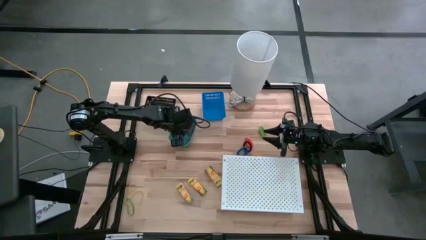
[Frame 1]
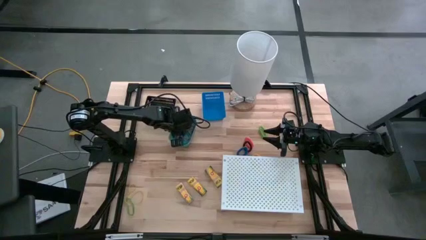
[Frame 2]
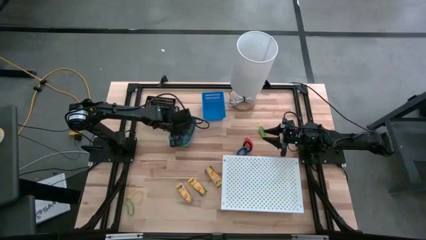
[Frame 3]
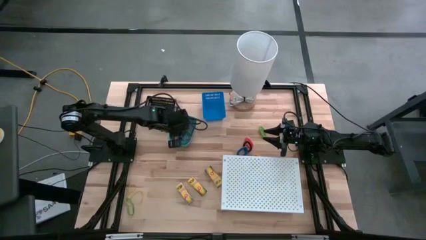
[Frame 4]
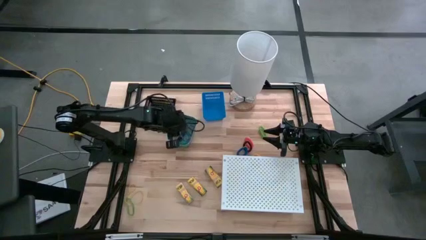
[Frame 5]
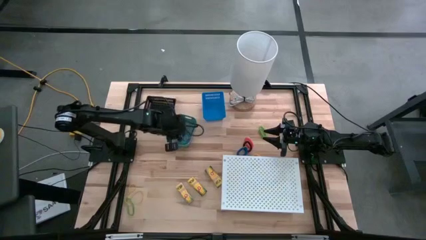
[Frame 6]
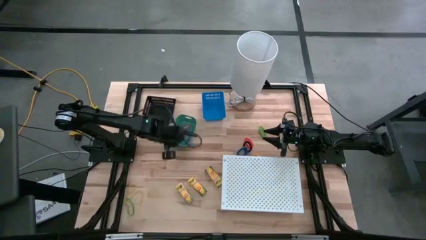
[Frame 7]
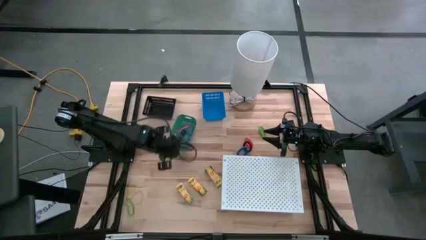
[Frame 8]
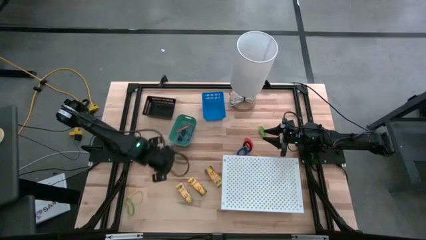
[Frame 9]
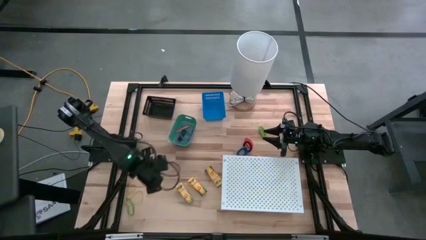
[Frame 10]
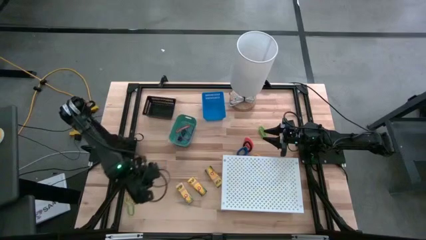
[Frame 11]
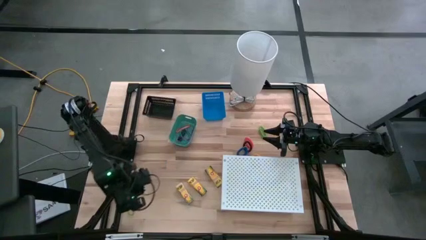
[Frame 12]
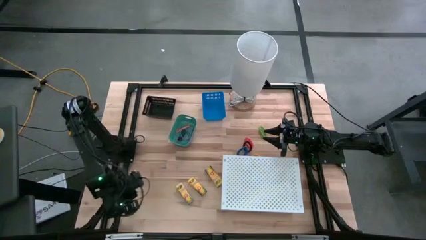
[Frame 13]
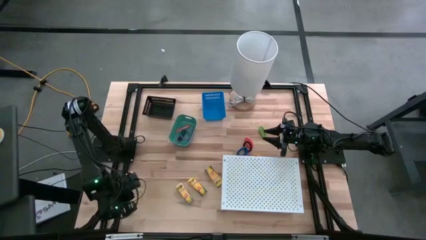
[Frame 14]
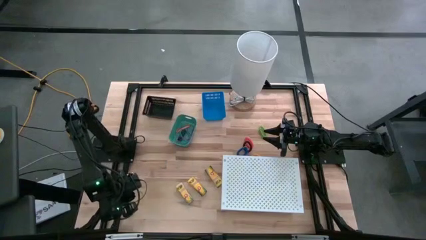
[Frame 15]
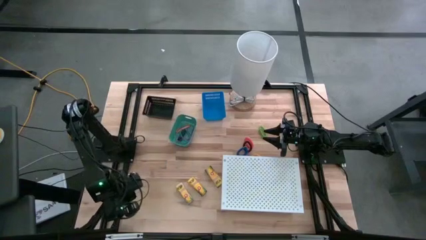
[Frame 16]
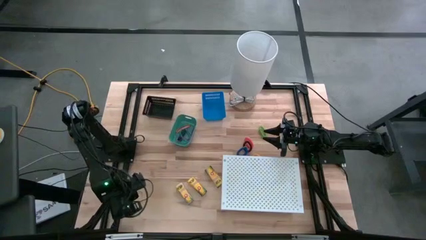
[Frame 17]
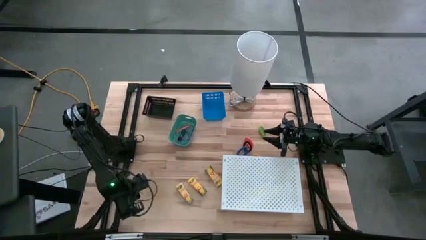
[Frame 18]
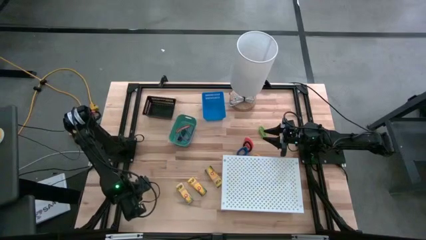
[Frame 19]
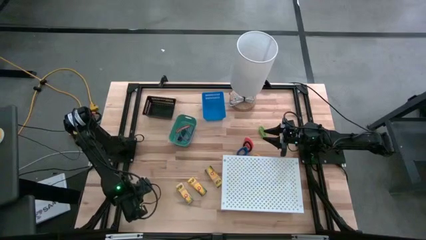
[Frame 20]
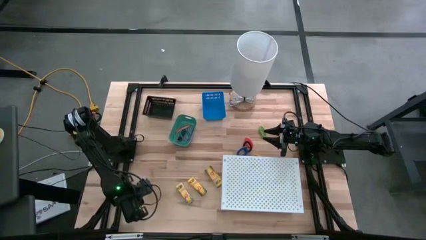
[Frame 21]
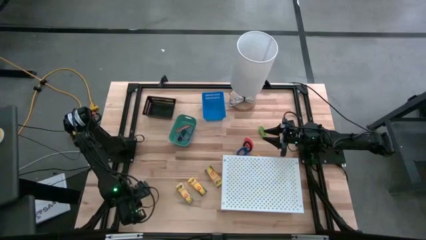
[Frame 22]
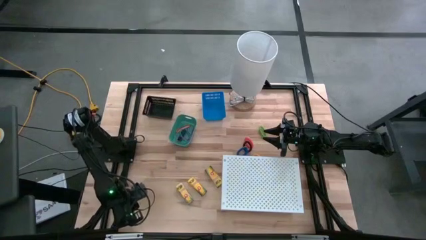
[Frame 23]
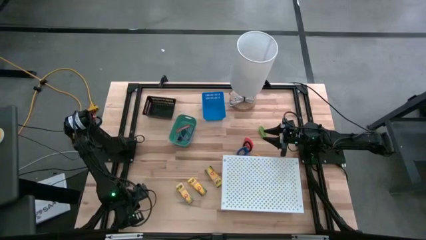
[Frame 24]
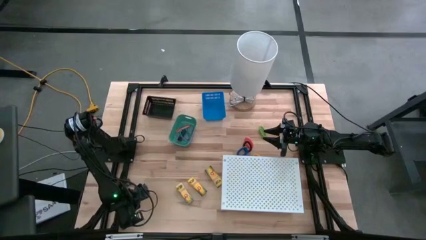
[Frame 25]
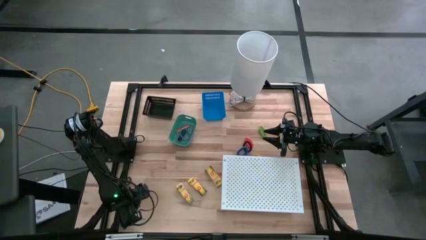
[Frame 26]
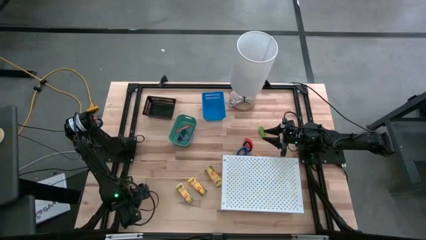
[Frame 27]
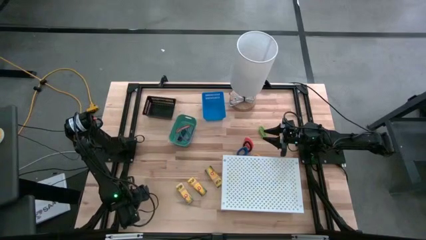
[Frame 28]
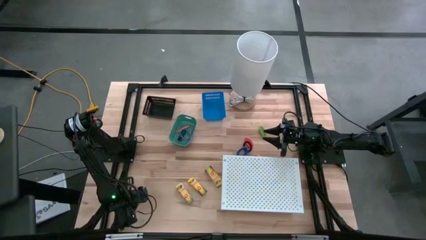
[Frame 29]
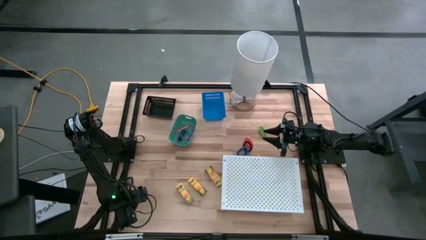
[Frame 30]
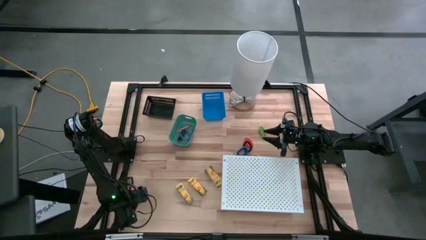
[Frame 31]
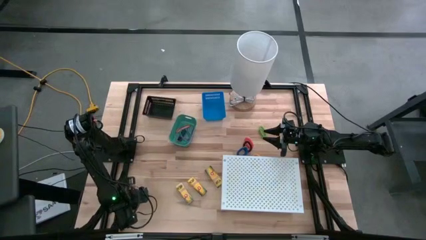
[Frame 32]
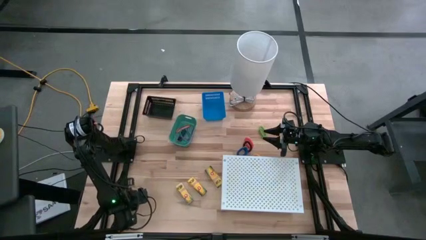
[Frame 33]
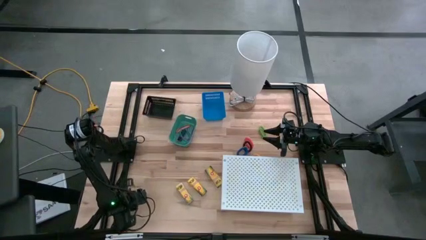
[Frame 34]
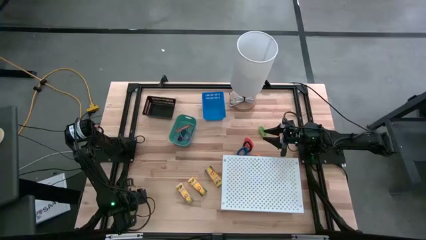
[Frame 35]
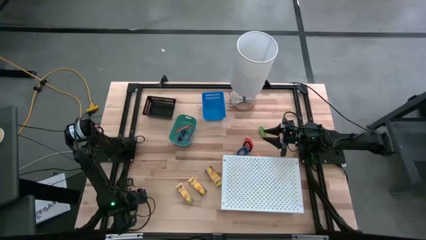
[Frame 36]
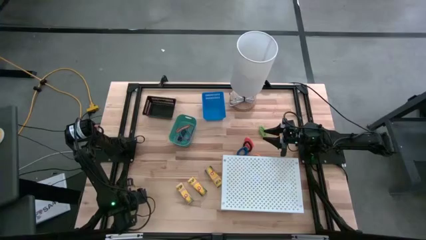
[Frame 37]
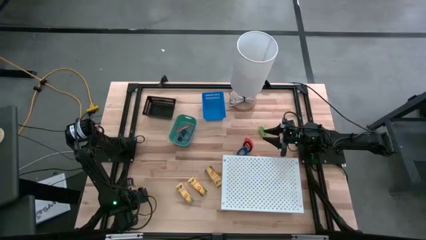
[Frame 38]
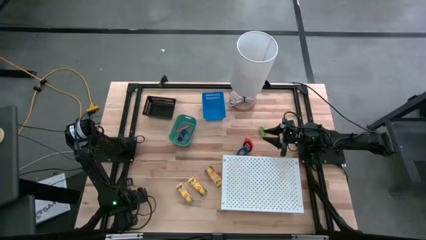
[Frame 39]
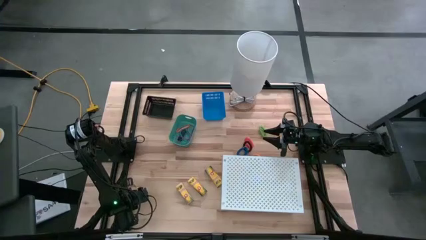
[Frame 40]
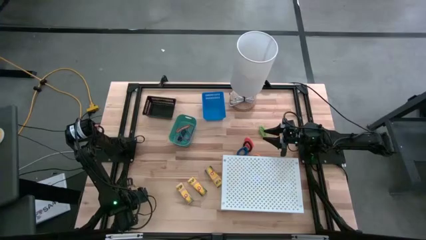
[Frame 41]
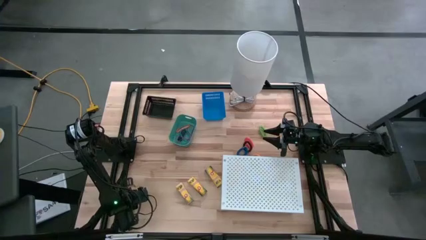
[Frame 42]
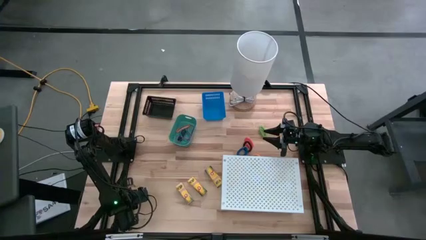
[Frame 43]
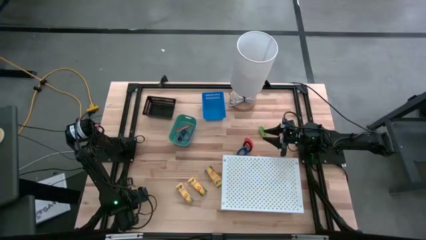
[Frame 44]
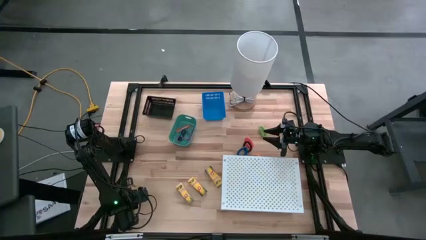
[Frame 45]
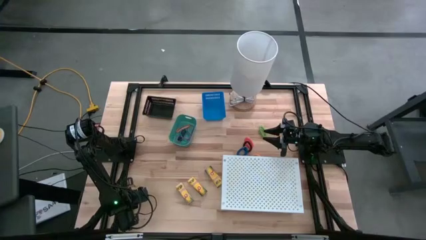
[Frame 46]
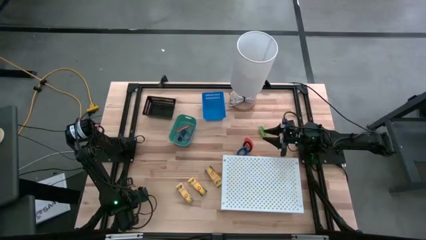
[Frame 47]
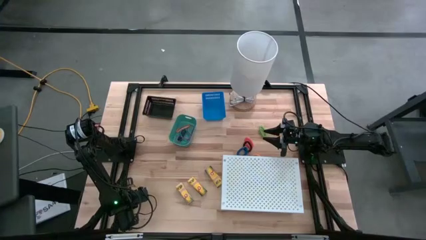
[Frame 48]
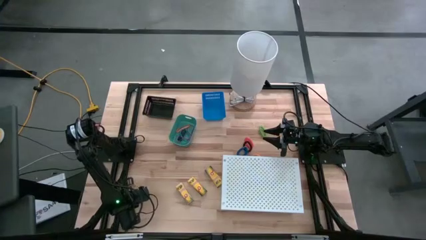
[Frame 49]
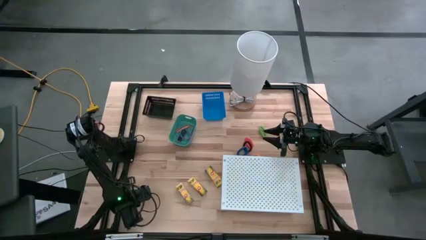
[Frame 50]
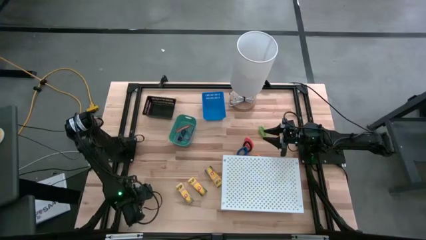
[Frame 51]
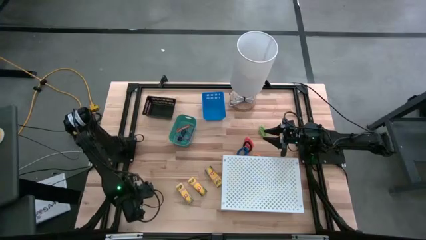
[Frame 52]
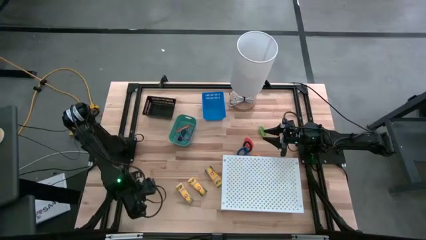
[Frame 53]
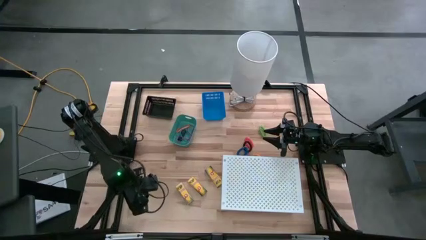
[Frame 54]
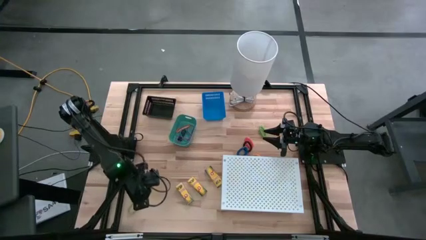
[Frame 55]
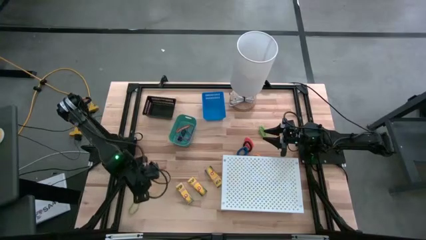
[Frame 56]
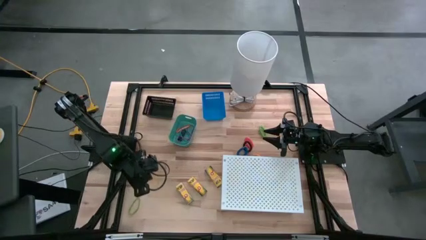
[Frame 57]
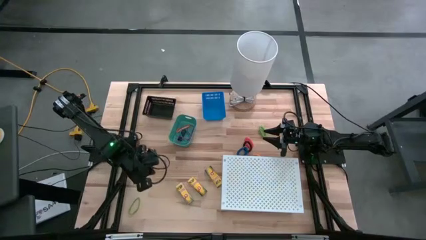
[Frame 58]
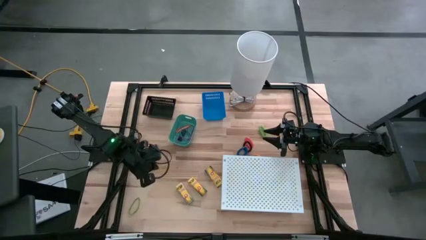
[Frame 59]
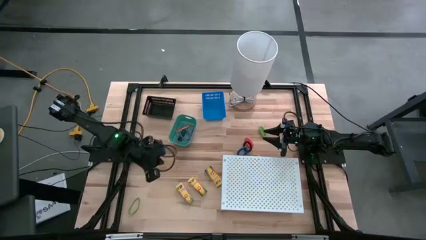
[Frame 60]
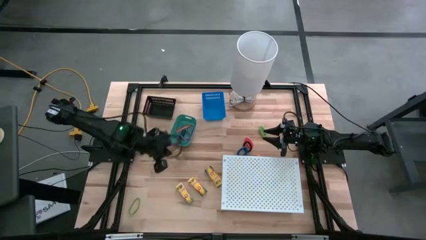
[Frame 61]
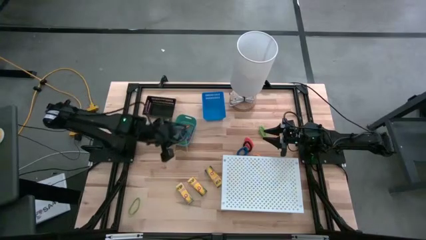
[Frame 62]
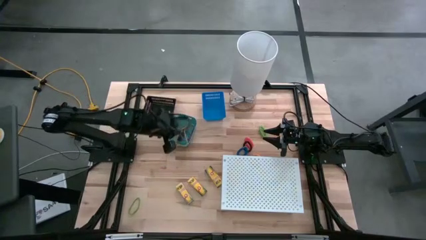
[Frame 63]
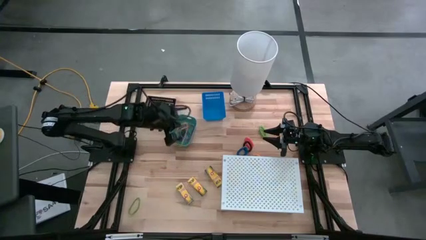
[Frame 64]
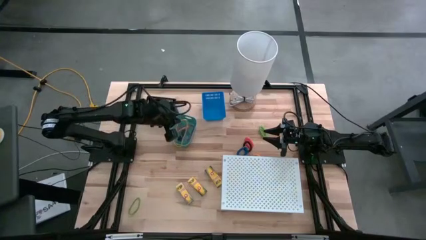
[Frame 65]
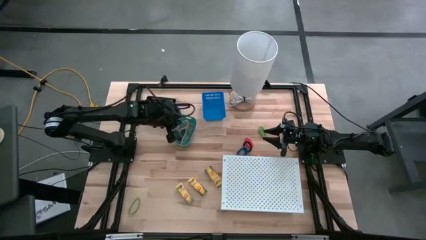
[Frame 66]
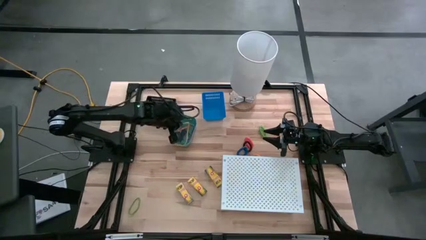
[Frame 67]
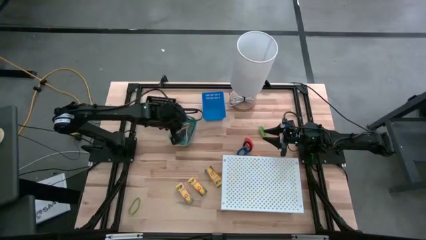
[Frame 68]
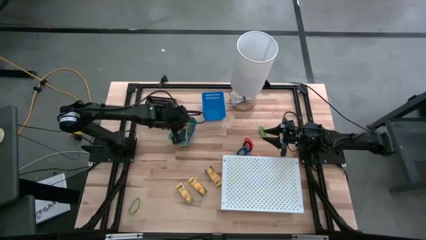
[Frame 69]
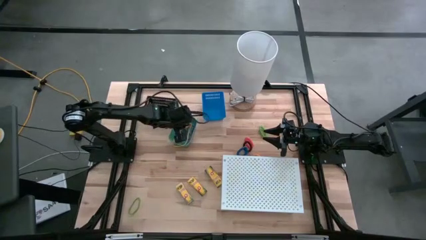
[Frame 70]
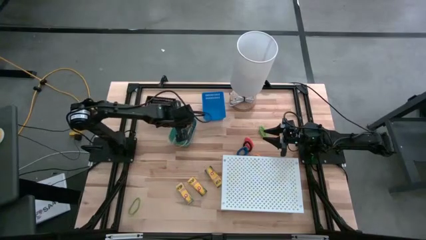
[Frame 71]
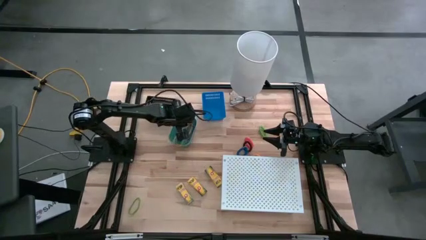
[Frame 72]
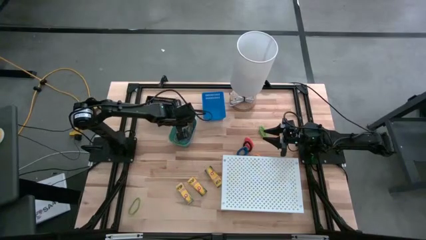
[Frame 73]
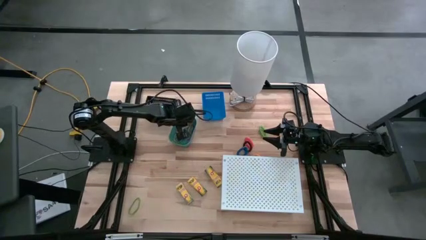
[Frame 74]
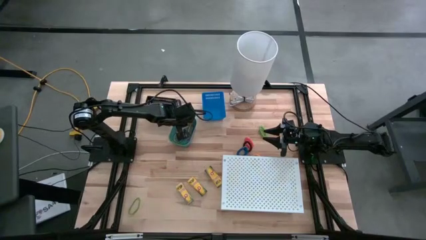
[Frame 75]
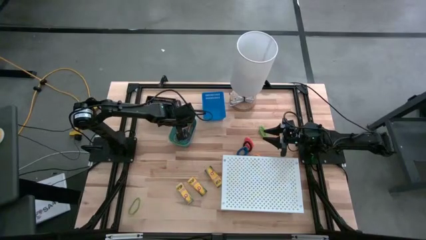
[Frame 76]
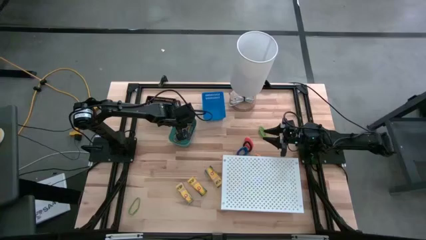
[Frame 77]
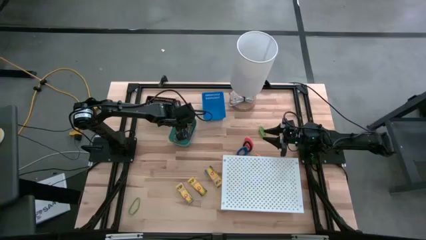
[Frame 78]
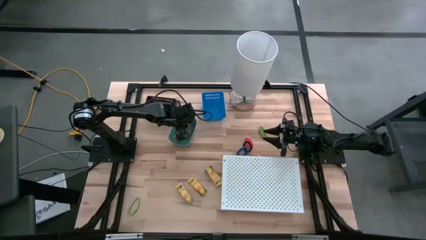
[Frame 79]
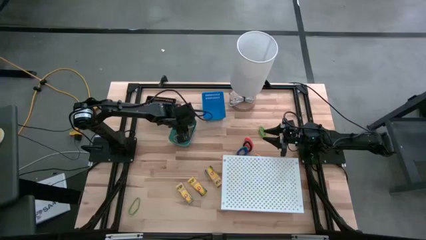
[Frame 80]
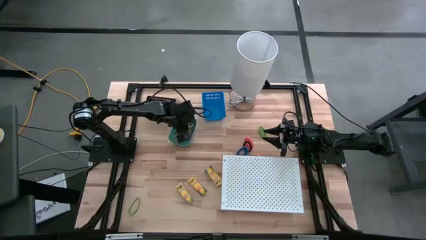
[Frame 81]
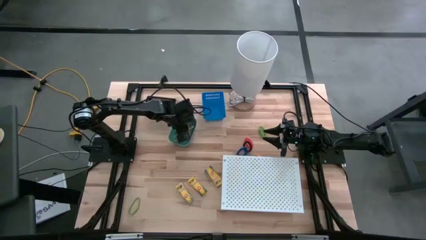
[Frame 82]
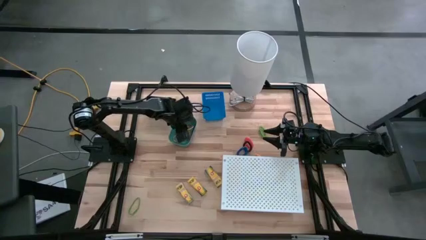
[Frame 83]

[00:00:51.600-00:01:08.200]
Task: Pick & Place Office Desk Supplies
Put the yellow rubber band into the green bin
